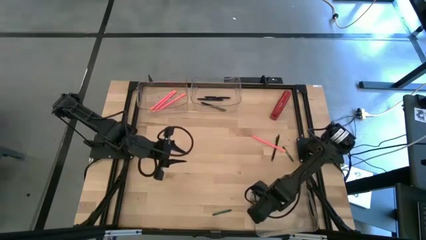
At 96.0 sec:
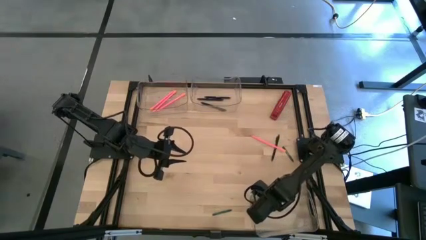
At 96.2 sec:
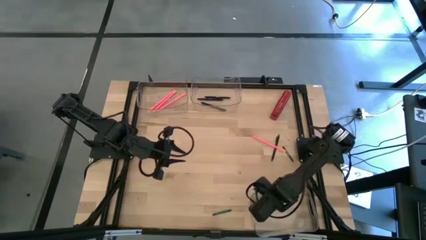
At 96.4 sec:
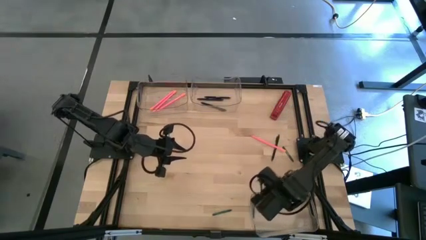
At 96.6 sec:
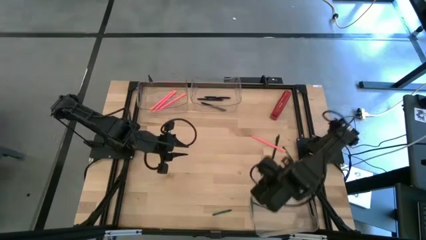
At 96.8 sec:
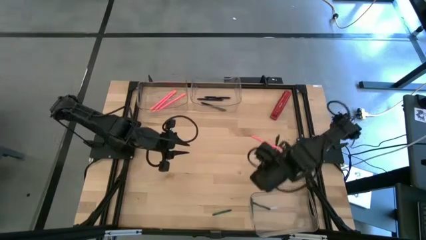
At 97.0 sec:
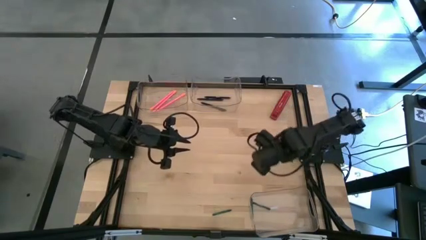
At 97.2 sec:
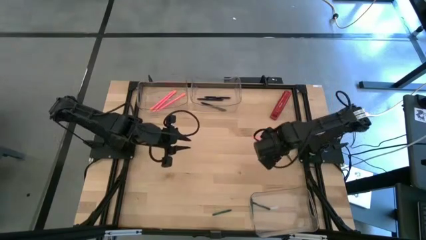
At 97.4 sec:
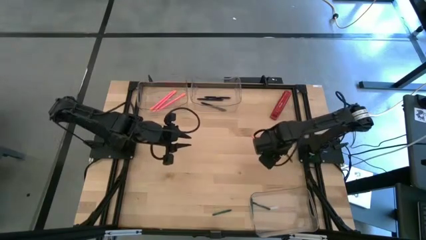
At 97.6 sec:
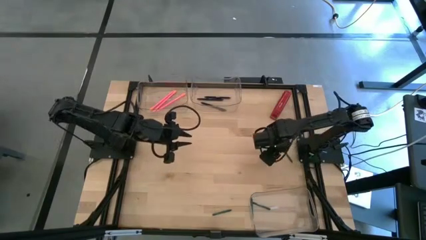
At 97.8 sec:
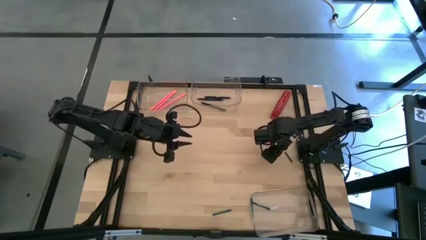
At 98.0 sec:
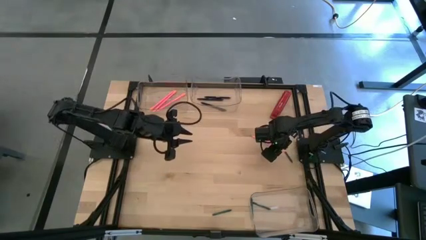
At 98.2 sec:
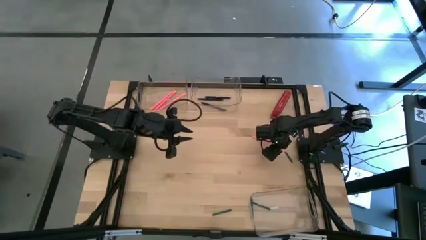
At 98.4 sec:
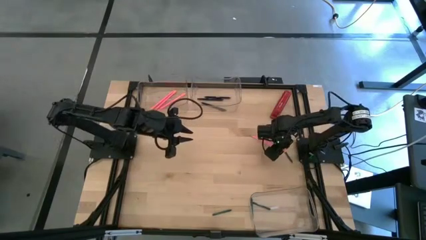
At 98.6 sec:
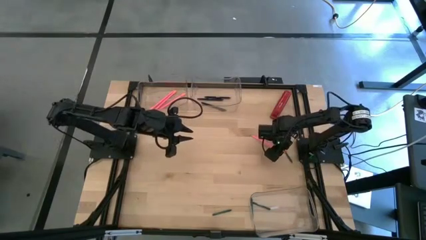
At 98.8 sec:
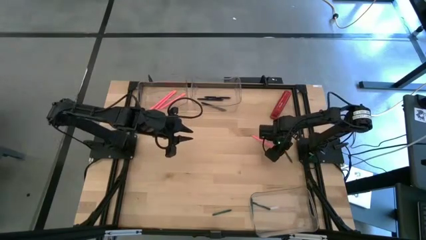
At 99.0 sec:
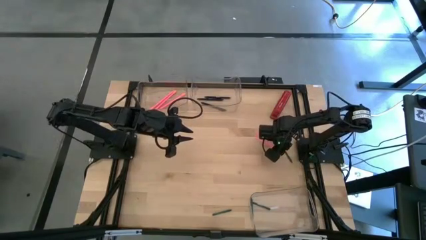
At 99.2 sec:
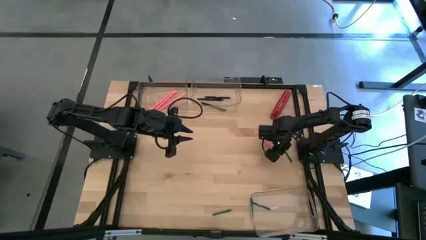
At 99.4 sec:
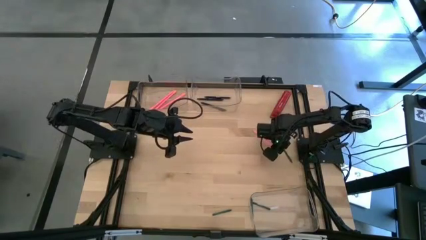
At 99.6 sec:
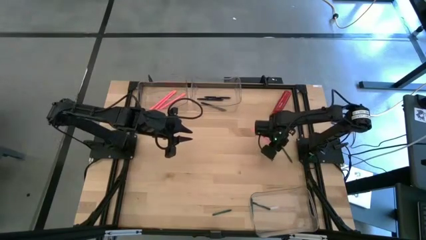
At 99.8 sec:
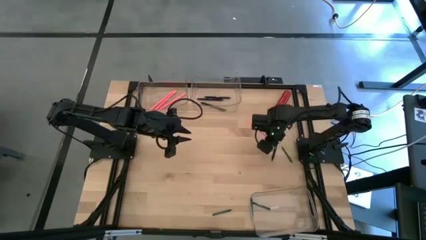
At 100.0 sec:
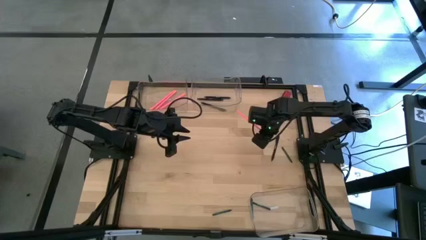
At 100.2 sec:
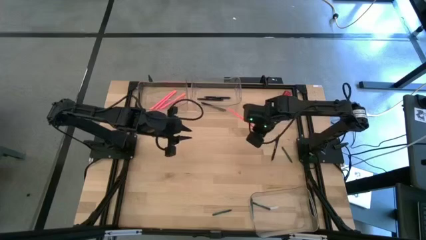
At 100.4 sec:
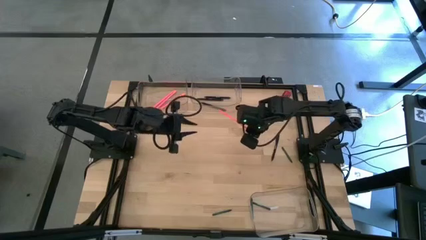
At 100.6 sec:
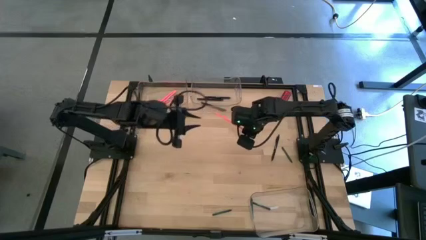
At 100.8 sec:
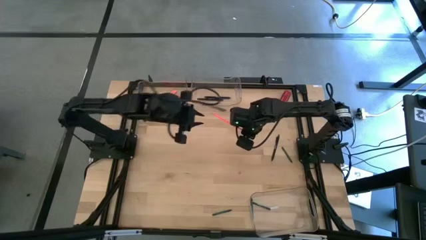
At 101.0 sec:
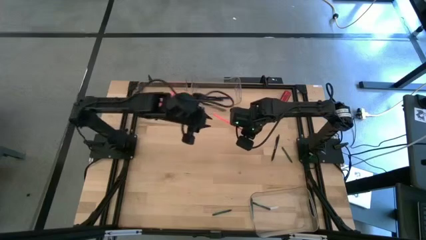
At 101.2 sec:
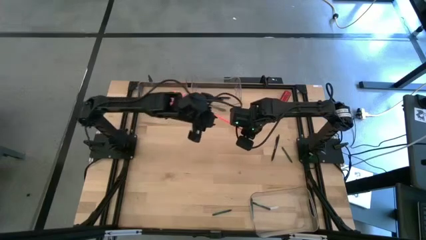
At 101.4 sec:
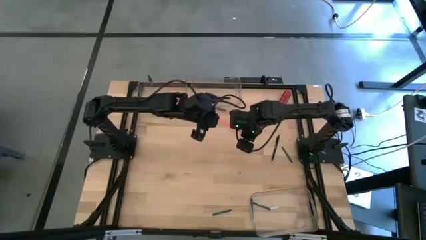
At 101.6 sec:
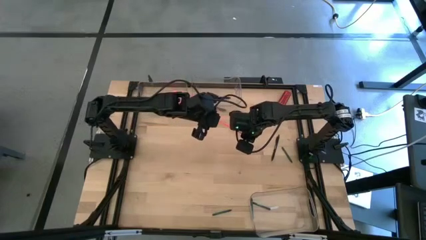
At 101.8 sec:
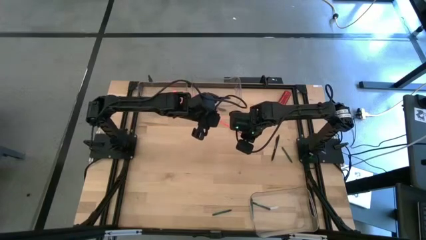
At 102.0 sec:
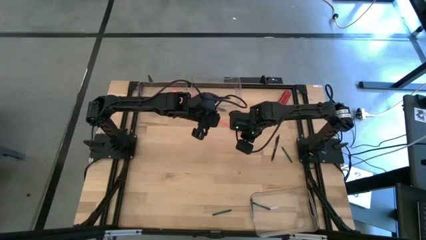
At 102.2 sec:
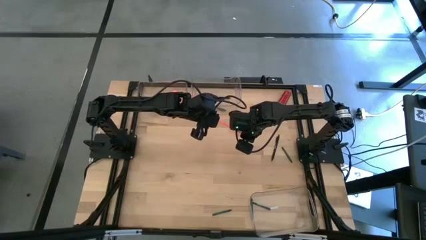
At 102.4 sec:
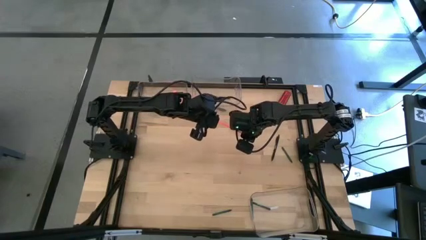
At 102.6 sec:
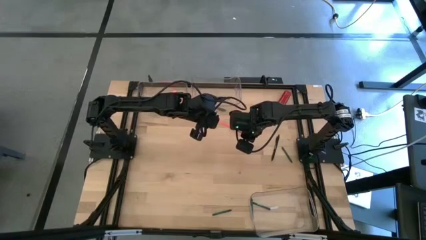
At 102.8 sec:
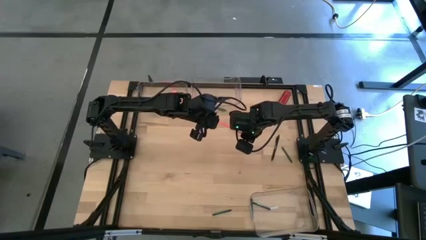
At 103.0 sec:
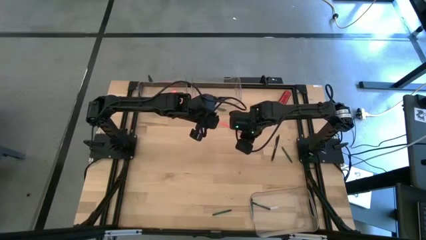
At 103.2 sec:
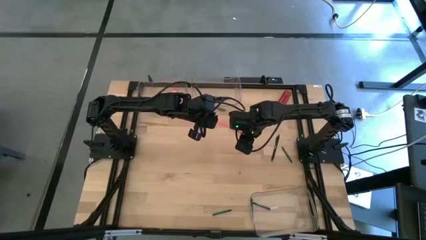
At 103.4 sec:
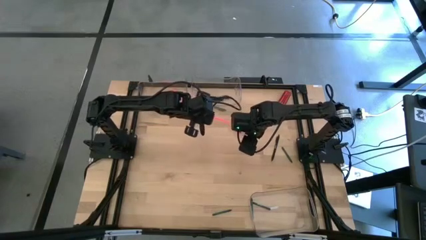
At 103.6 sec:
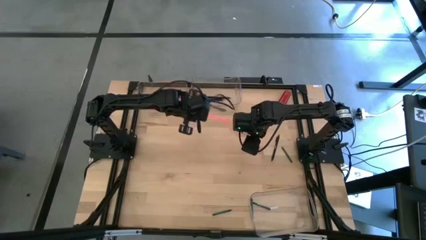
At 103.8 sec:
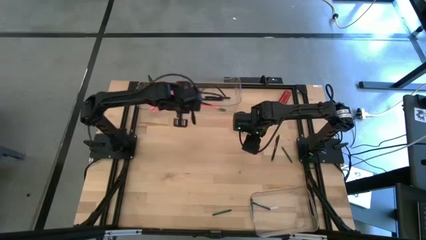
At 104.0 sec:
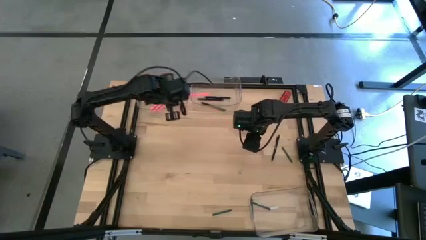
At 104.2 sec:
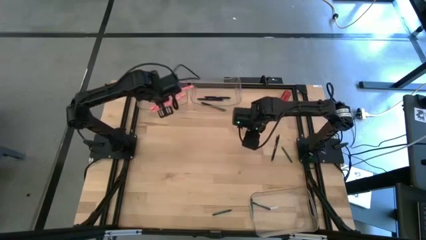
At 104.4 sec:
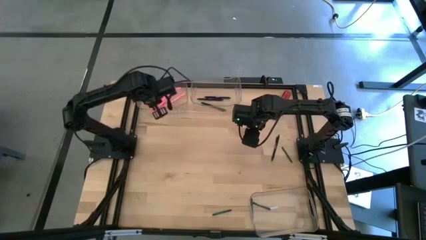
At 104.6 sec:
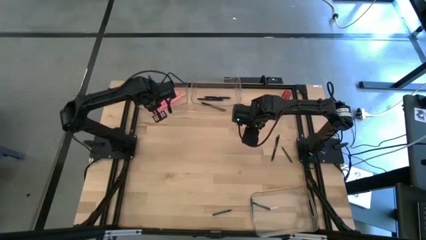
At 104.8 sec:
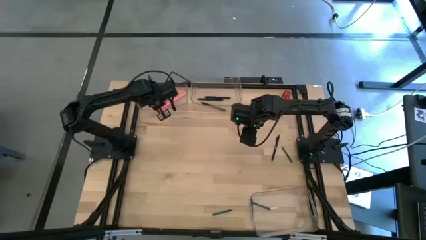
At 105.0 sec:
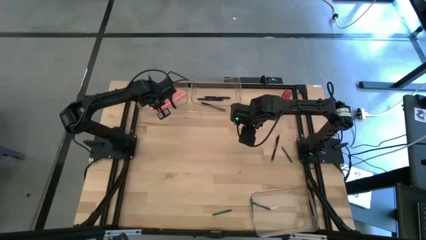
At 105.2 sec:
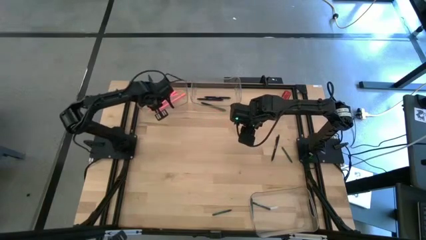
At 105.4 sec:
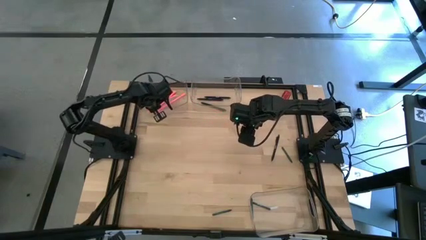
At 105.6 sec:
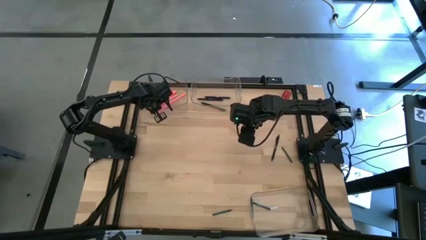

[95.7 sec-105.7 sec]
Task: Sort crayons/erasers/pens/pencils in bins
Put the pink pencil into the top left transparent bin

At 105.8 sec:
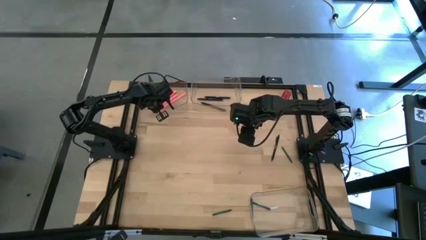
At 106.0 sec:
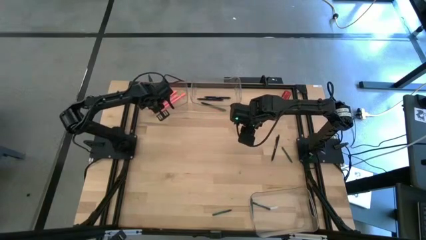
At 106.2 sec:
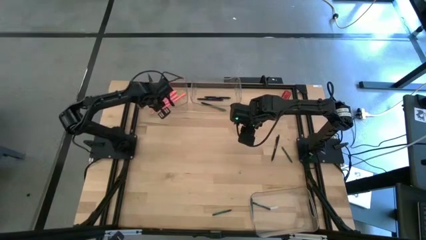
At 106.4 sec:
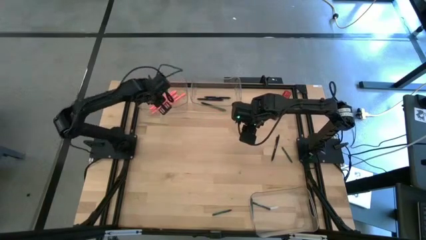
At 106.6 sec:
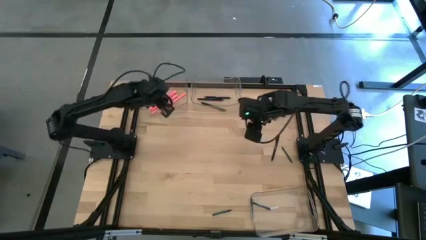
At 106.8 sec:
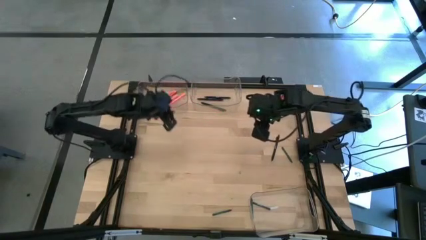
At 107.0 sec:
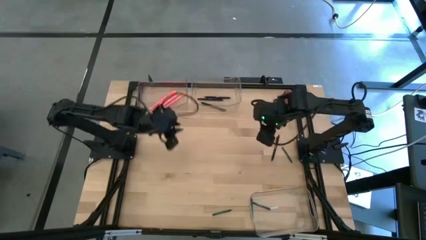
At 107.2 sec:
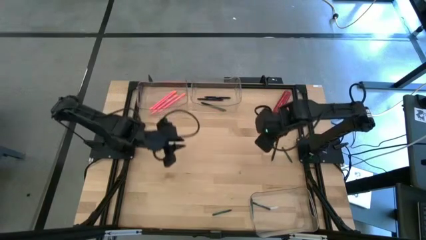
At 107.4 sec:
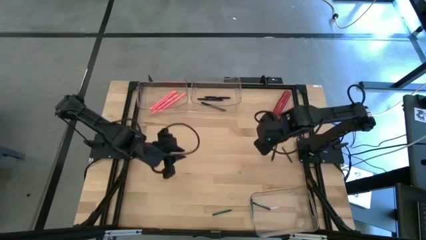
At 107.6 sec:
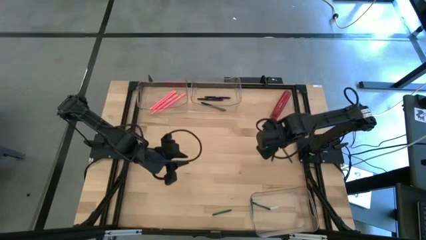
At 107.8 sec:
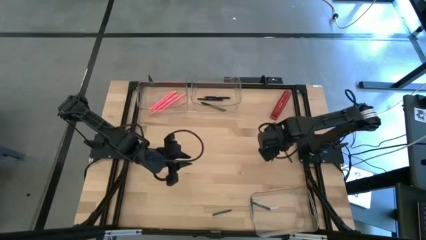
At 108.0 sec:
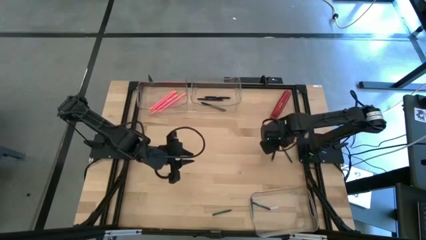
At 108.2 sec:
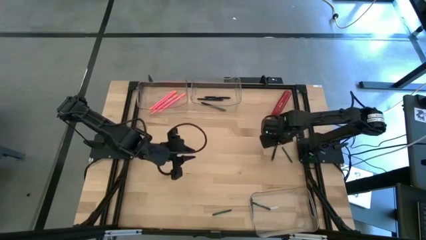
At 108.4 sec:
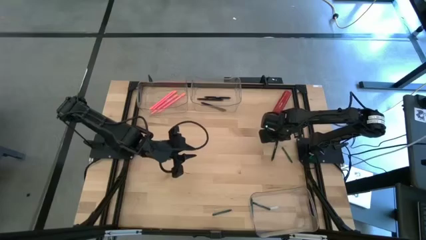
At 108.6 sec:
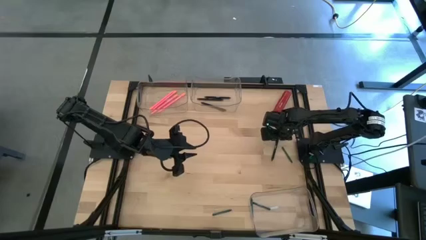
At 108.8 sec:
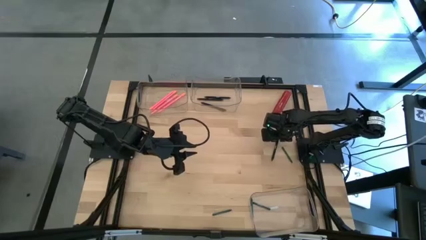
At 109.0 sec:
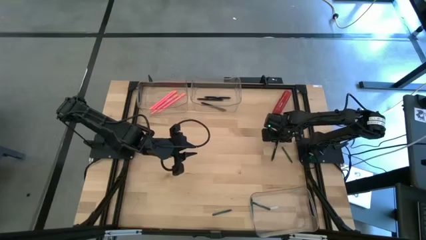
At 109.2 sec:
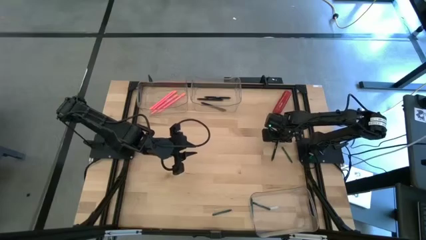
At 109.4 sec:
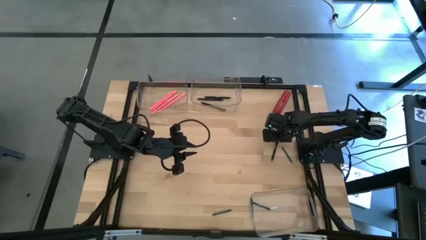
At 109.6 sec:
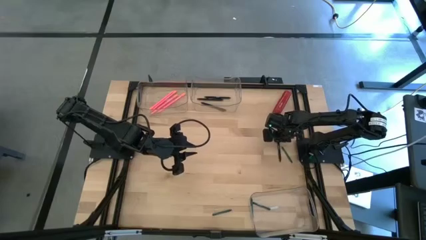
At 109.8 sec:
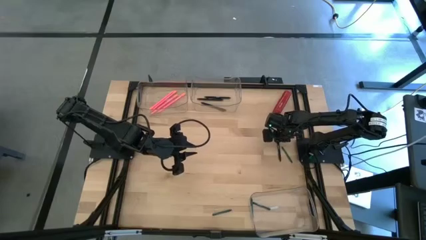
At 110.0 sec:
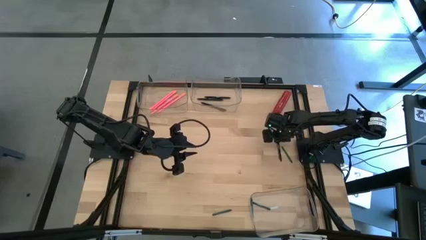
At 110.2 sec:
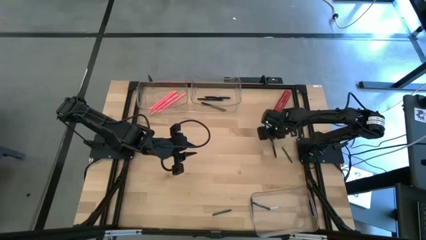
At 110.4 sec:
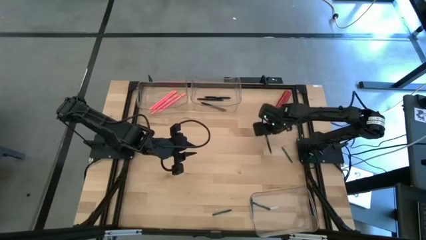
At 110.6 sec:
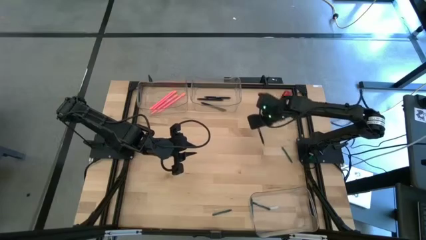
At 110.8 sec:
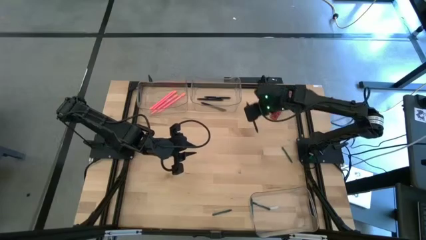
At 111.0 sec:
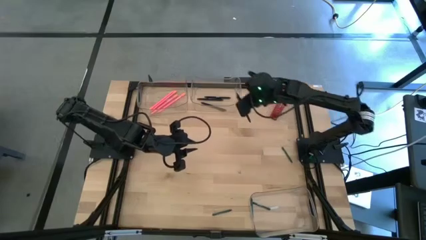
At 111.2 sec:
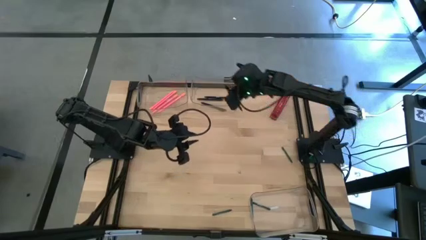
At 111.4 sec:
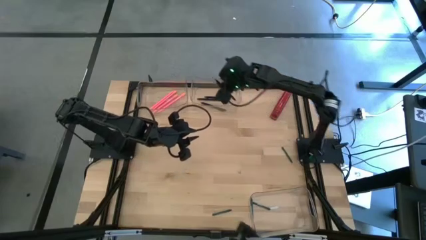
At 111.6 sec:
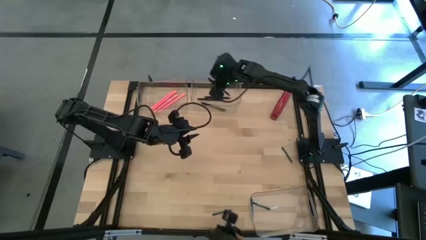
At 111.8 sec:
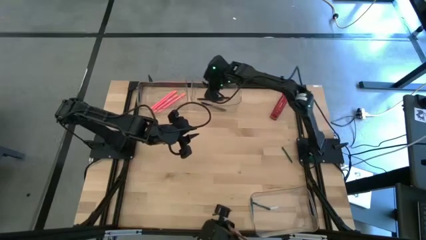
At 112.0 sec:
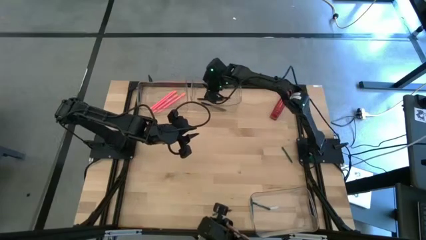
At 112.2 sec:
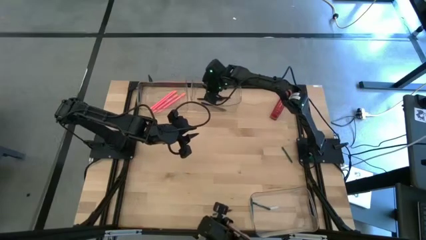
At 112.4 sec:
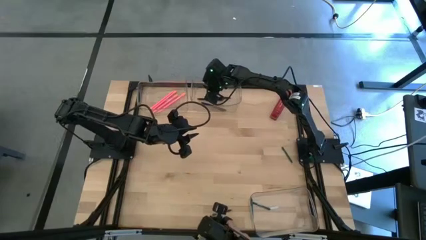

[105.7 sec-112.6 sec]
Put the black pen into the top right transparent bin
